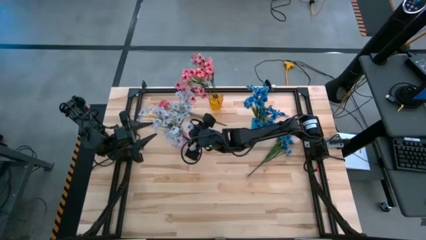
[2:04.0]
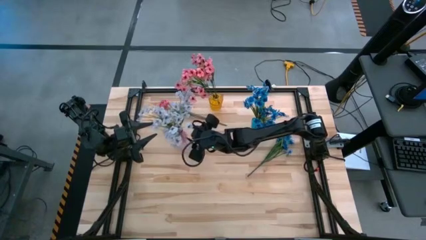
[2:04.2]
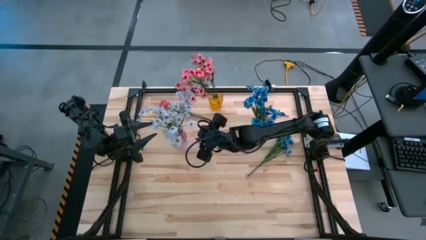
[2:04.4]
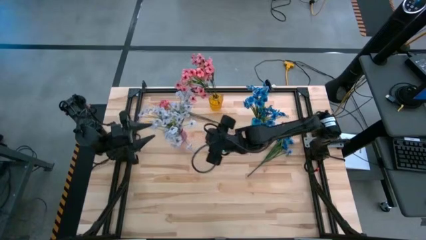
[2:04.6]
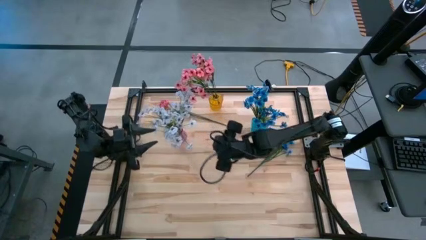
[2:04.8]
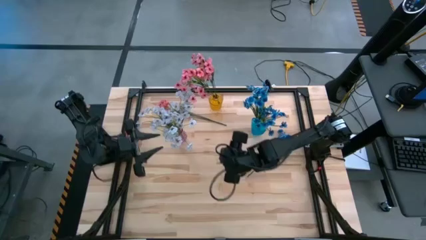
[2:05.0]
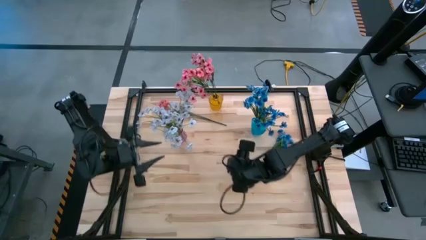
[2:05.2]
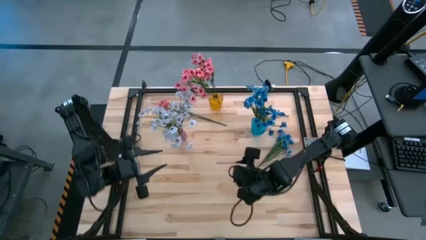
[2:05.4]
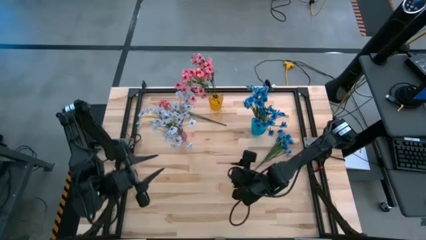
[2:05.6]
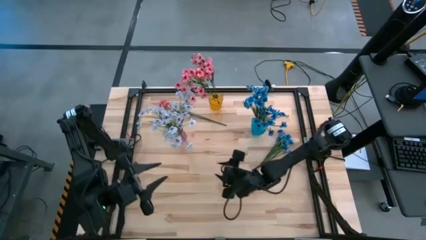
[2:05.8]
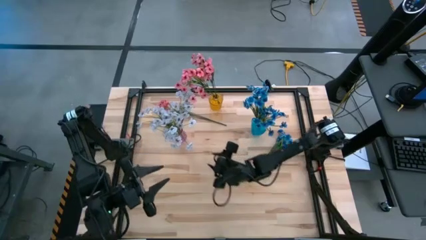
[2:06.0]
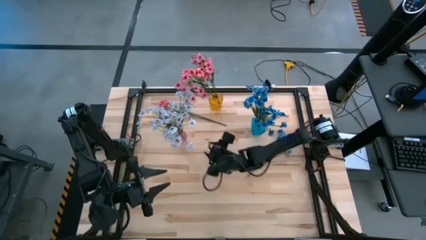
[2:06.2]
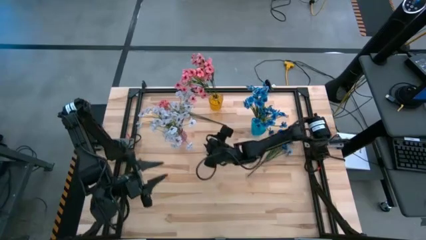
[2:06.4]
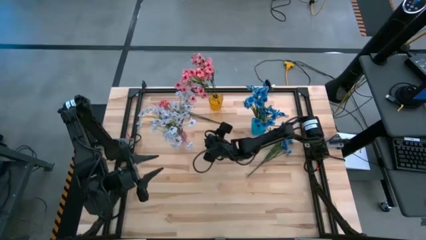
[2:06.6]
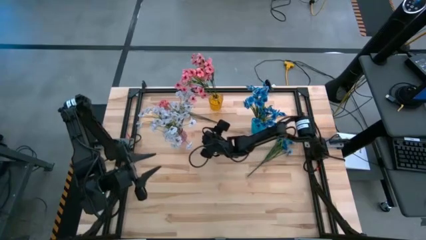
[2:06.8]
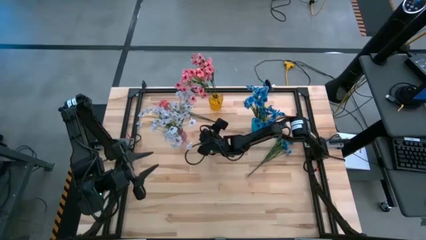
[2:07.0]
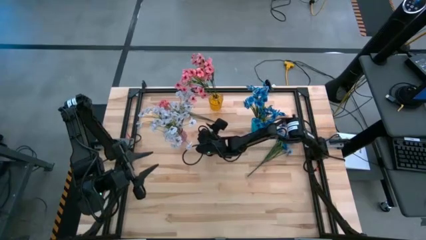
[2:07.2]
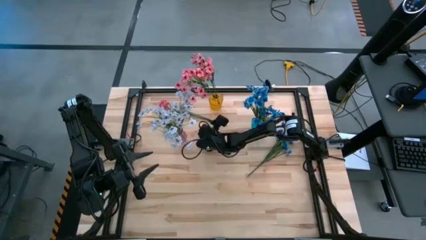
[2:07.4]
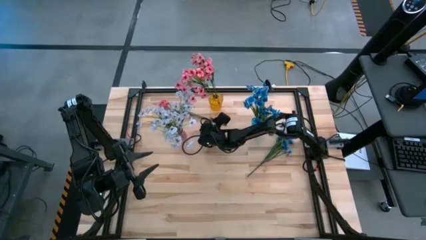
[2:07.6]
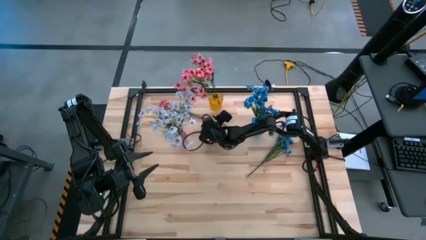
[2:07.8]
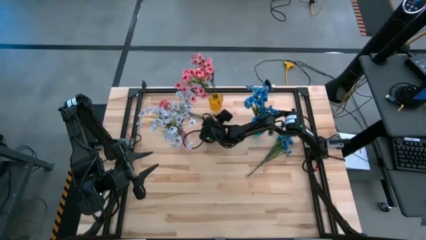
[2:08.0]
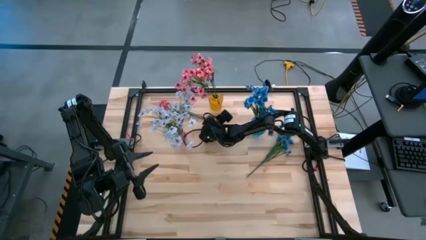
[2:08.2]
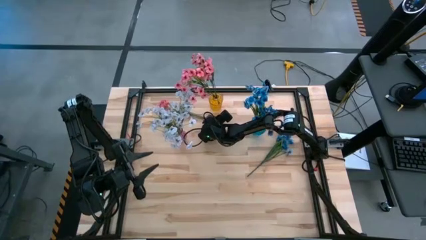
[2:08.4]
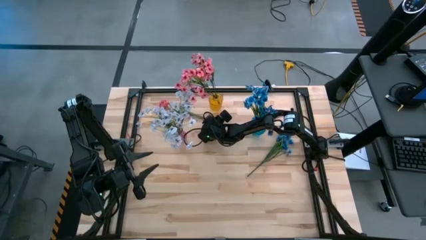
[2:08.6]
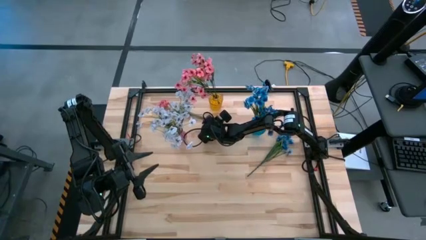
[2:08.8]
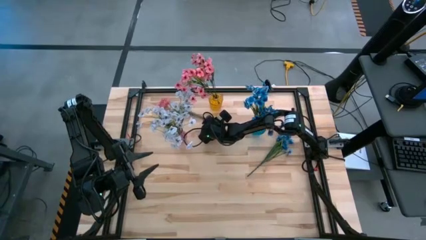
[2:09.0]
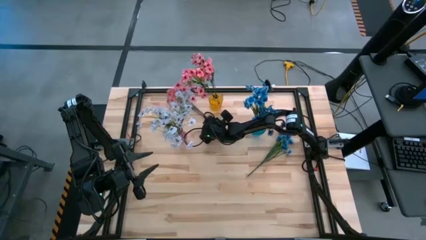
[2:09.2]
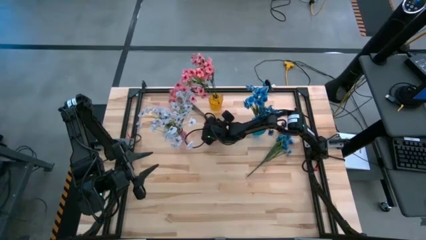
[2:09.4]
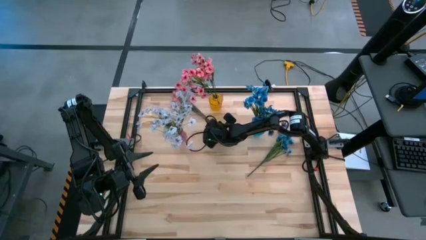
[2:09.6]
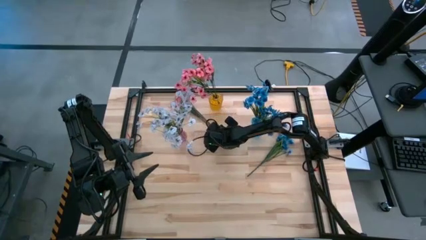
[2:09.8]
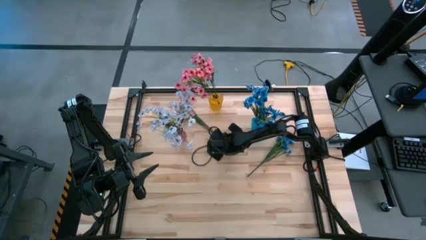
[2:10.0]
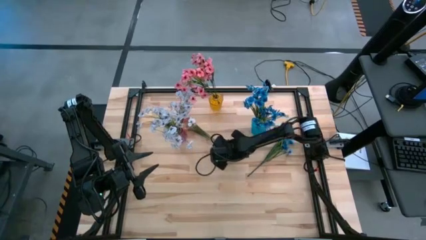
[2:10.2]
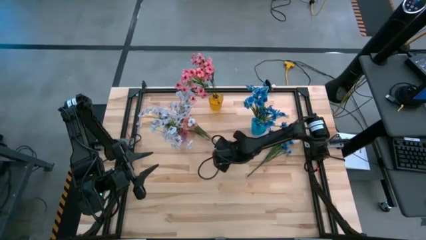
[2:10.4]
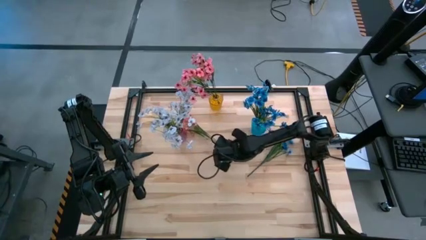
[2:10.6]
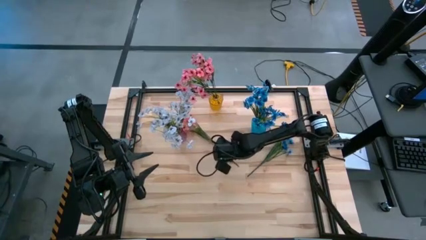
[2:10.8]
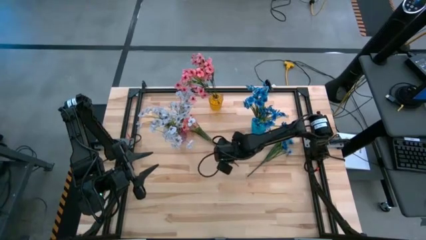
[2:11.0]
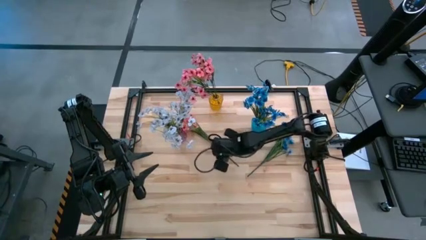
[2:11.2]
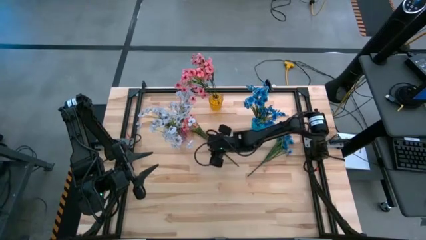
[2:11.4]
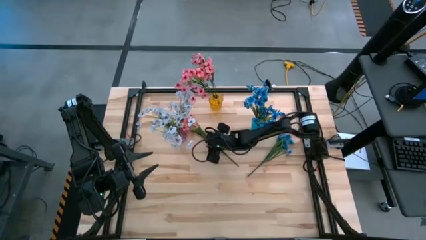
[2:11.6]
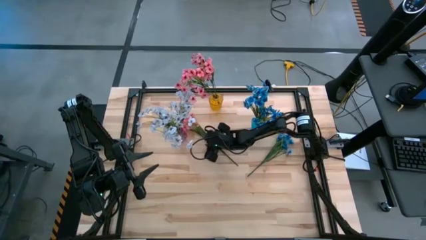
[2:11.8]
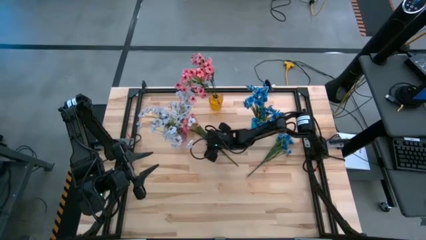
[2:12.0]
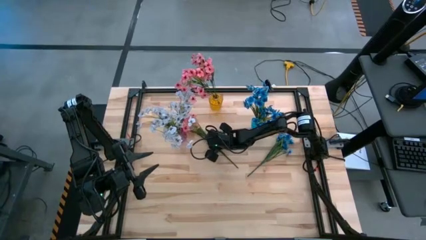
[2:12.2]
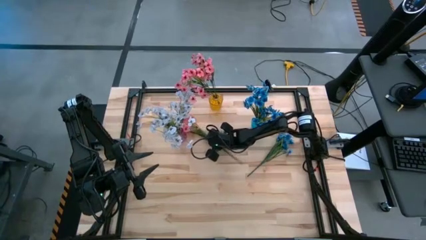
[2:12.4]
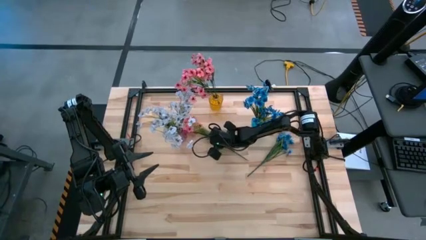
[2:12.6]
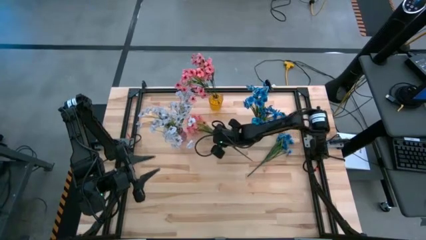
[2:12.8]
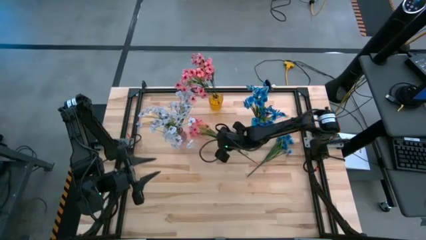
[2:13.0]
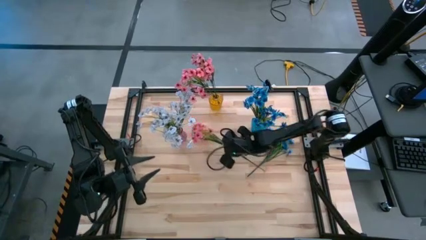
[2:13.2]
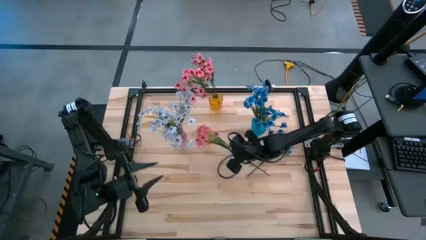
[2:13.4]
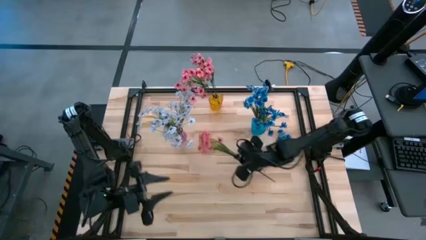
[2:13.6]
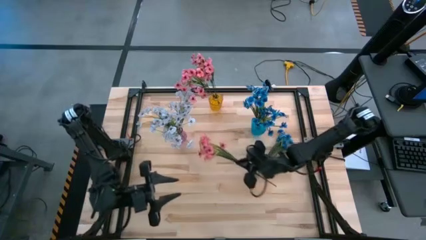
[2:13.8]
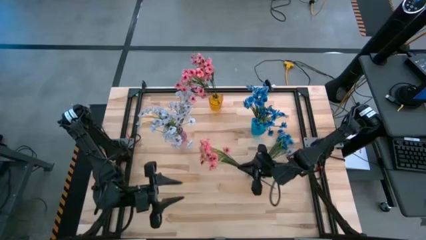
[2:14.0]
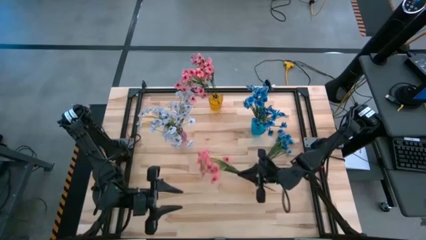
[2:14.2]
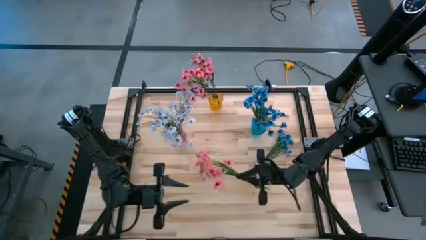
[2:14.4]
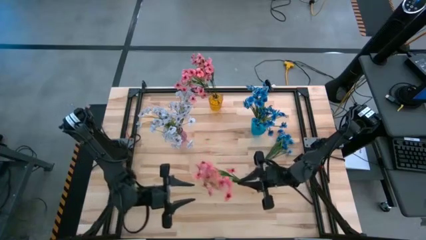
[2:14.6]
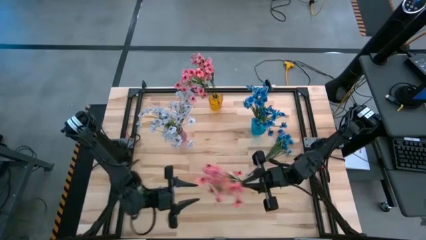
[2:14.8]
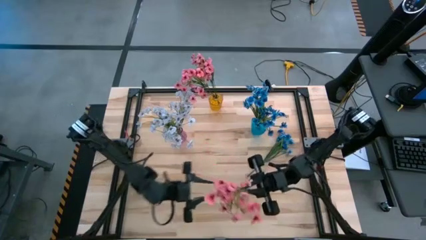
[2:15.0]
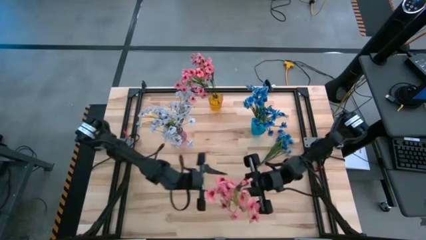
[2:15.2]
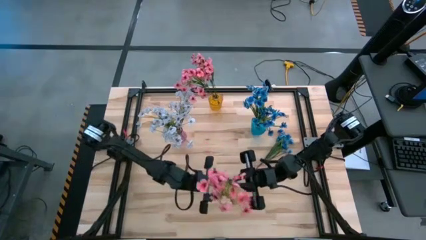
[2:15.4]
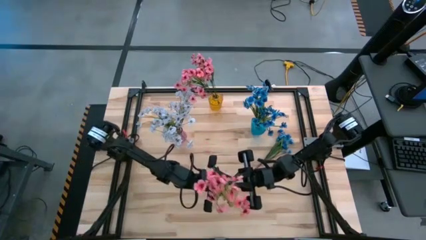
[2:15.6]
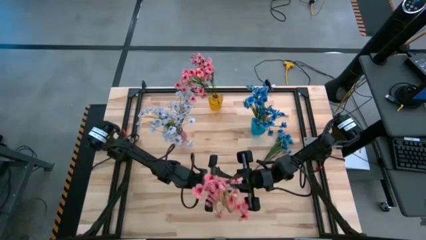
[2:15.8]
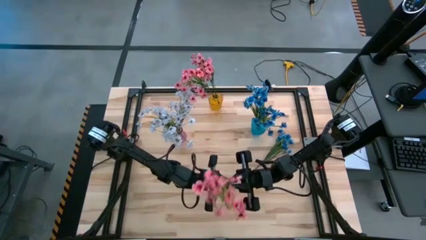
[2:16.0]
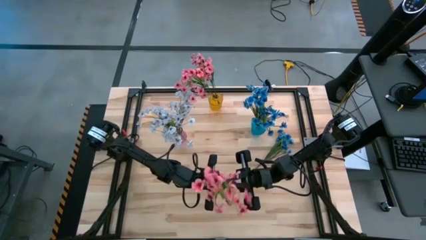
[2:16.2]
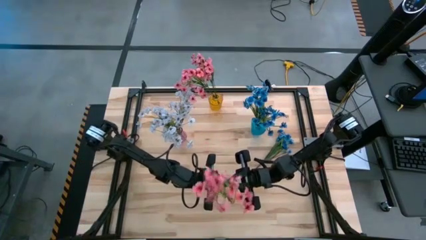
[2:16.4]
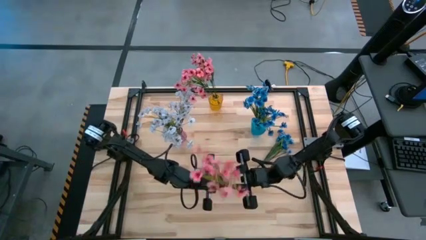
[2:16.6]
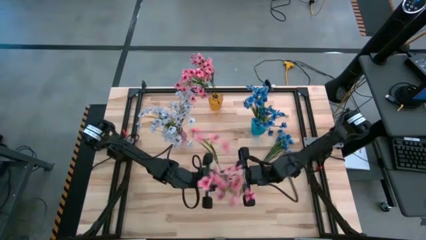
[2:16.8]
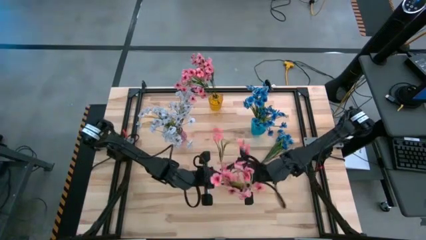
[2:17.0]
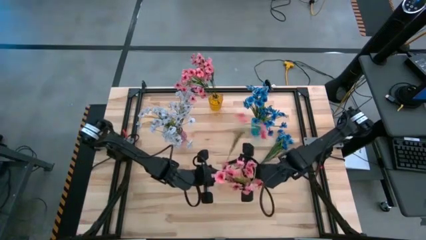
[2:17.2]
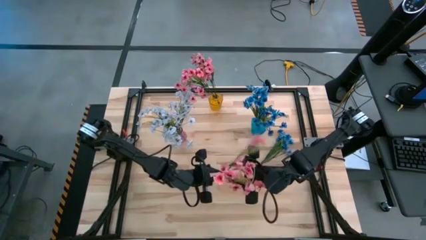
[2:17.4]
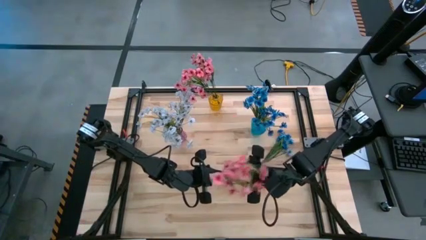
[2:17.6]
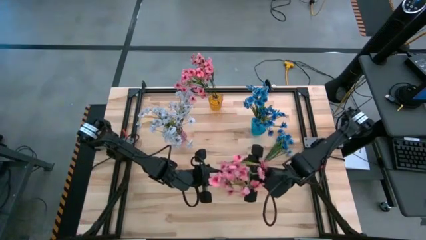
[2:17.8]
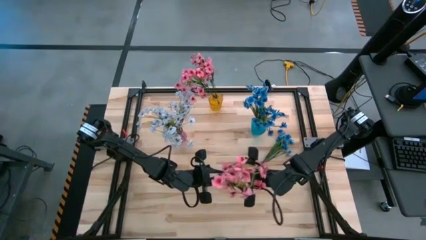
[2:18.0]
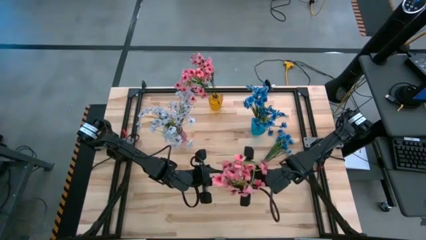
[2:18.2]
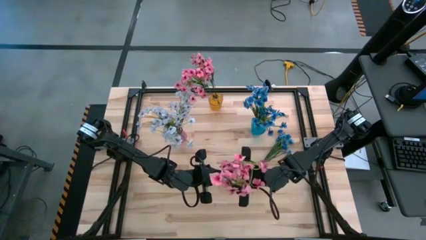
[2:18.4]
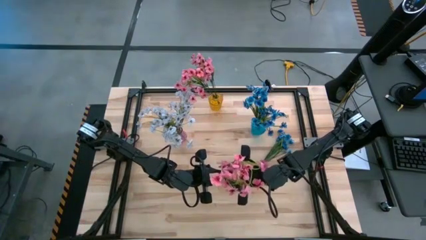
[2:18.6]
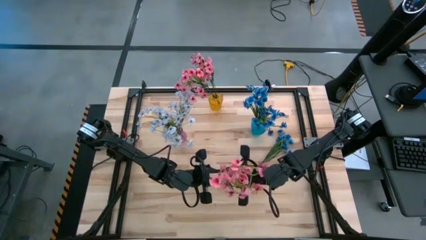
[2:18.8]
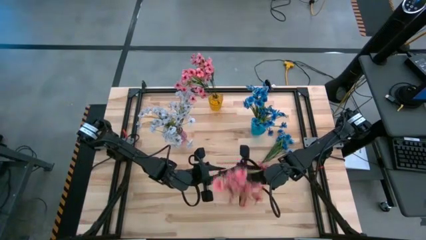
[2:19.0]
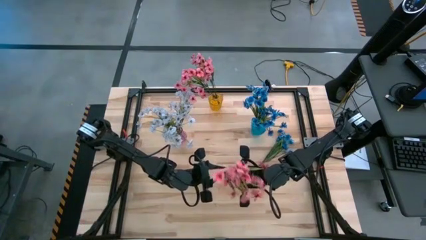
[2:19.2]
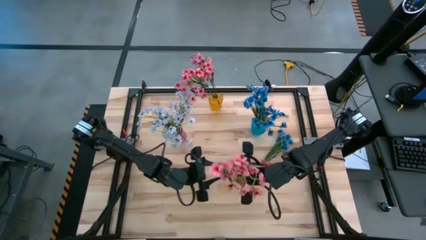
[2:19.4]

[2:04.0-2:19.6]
Task: Sort flowers into vase by color
Put the pink flowers into the yellow vase
